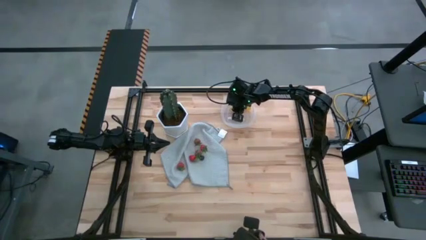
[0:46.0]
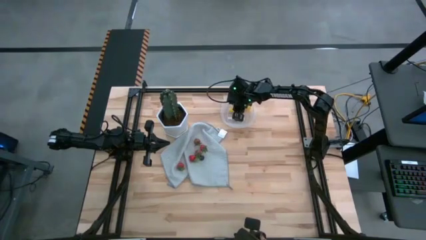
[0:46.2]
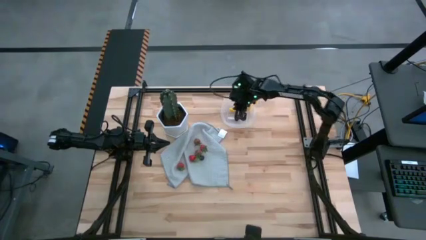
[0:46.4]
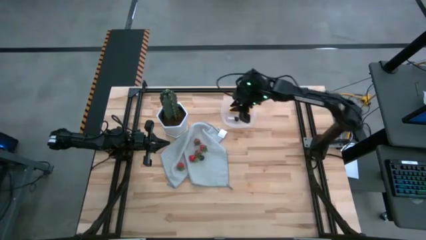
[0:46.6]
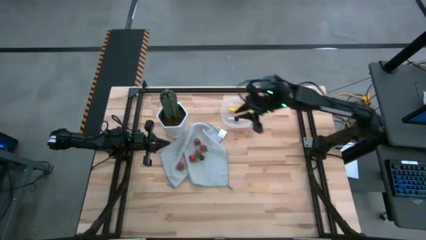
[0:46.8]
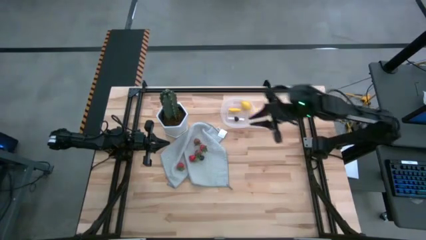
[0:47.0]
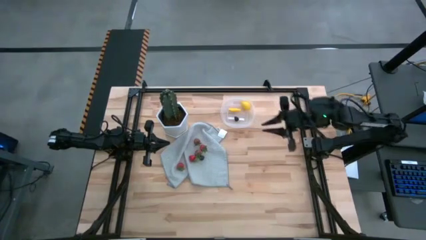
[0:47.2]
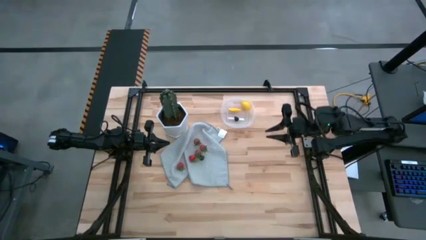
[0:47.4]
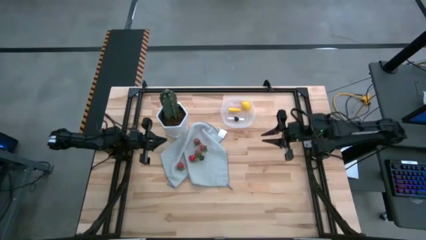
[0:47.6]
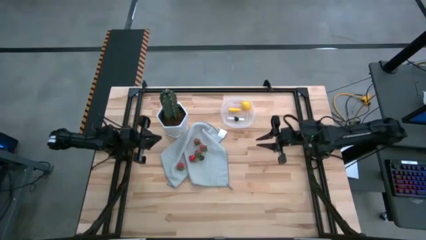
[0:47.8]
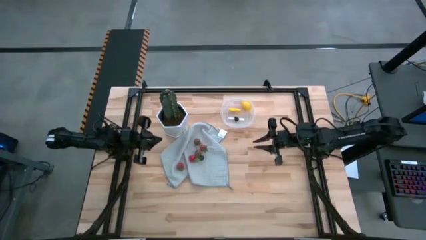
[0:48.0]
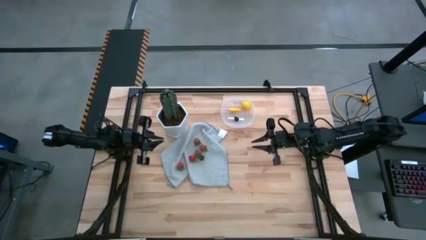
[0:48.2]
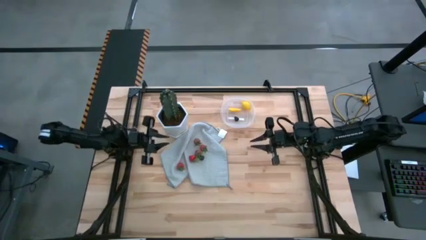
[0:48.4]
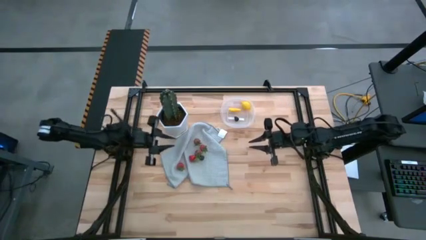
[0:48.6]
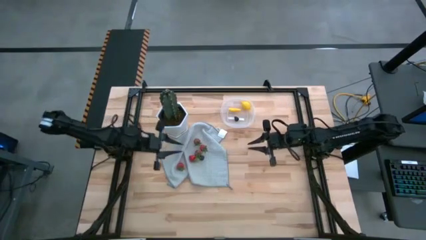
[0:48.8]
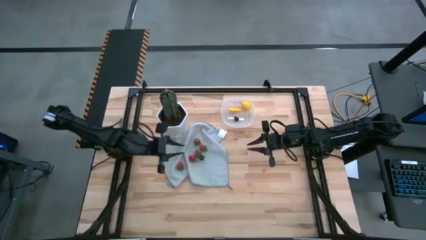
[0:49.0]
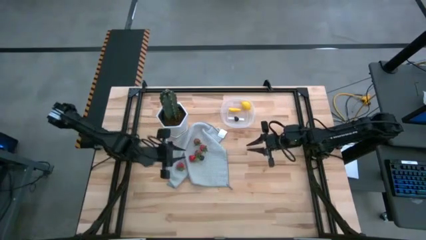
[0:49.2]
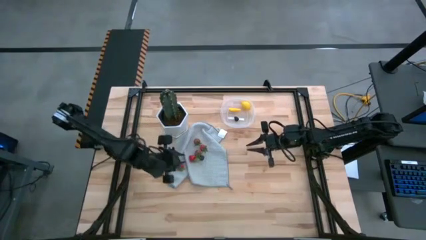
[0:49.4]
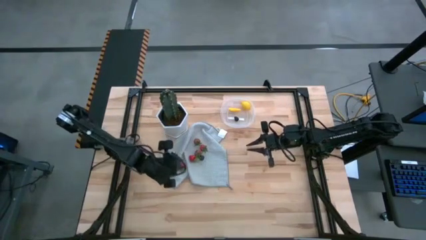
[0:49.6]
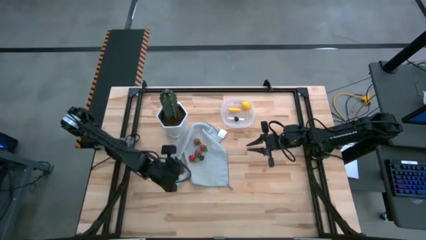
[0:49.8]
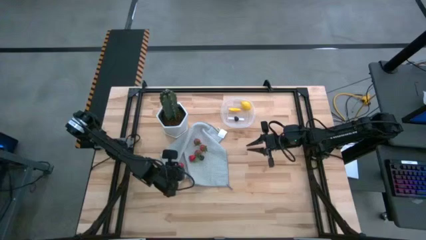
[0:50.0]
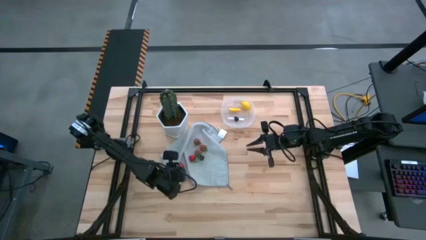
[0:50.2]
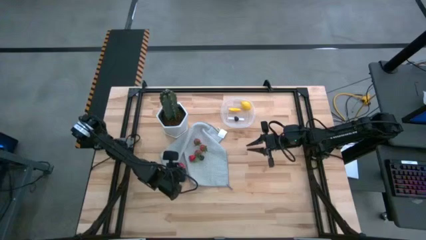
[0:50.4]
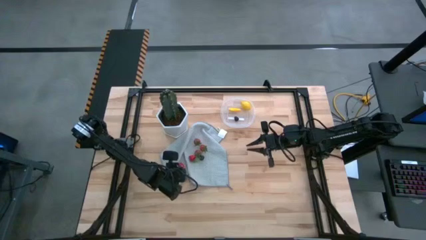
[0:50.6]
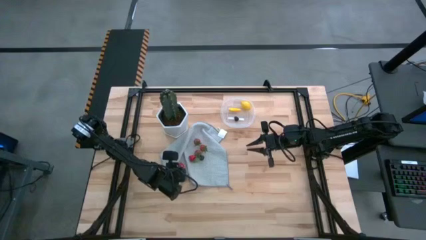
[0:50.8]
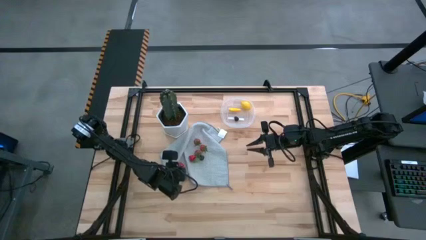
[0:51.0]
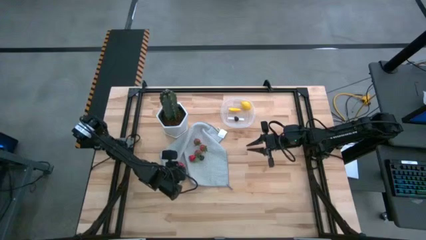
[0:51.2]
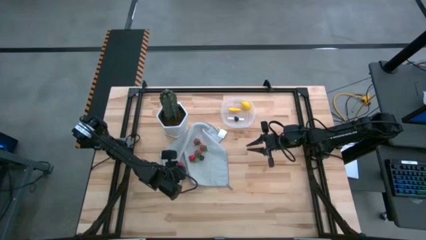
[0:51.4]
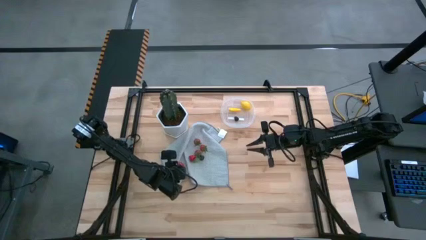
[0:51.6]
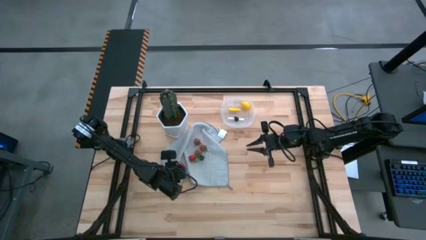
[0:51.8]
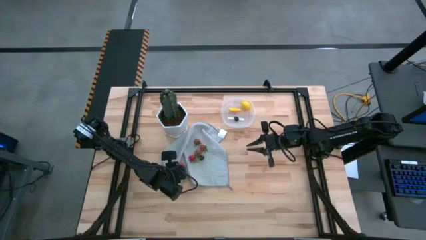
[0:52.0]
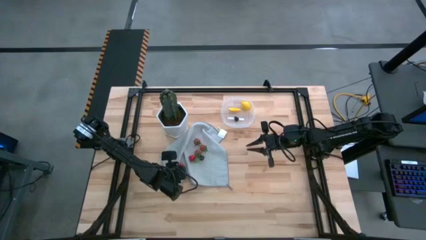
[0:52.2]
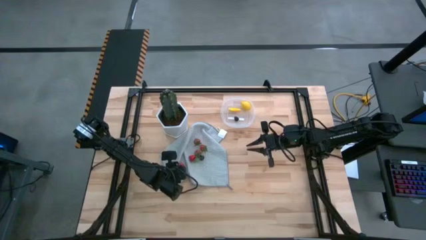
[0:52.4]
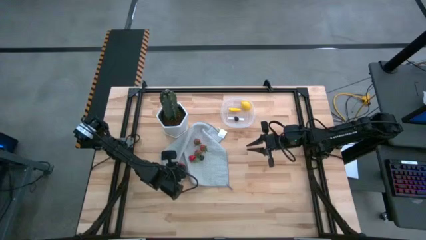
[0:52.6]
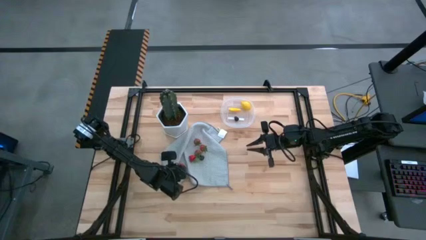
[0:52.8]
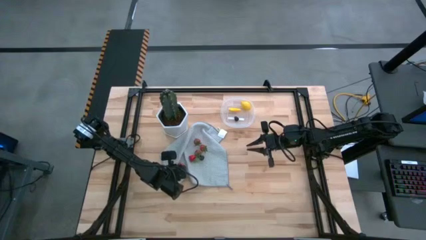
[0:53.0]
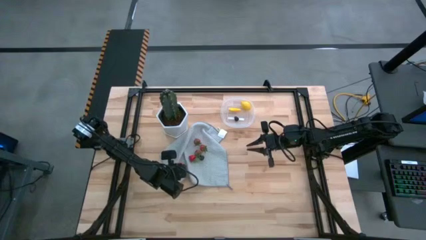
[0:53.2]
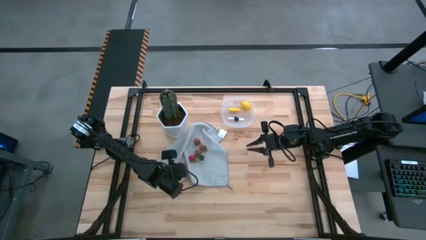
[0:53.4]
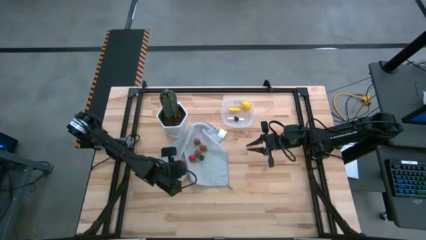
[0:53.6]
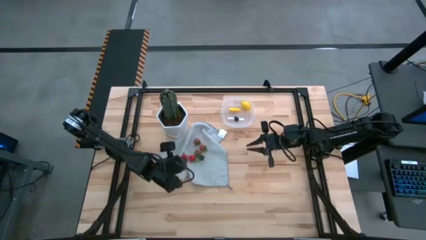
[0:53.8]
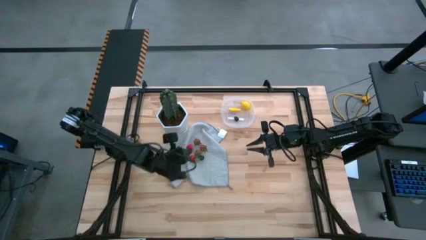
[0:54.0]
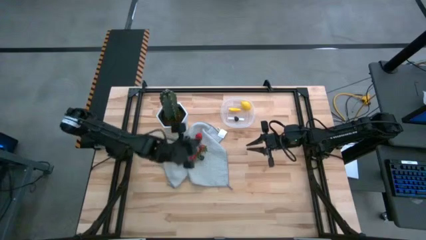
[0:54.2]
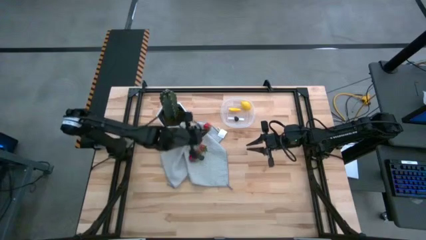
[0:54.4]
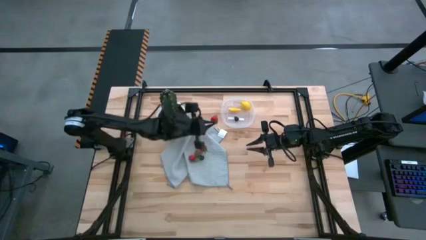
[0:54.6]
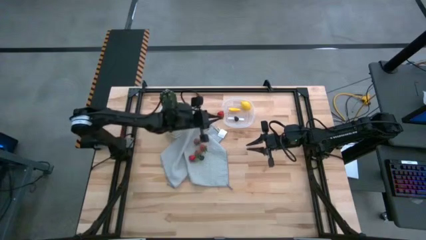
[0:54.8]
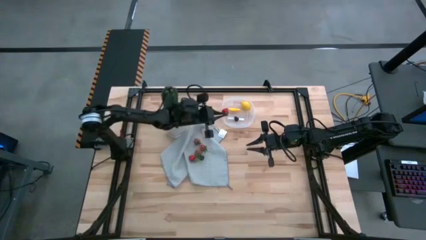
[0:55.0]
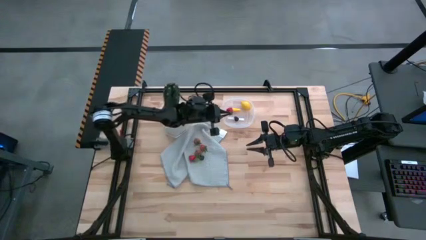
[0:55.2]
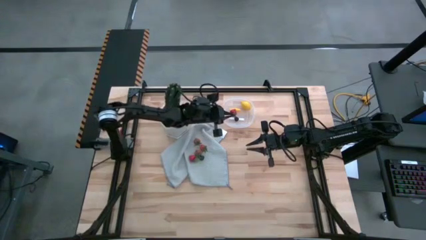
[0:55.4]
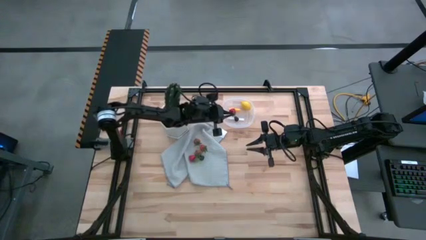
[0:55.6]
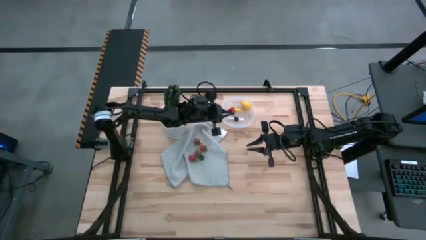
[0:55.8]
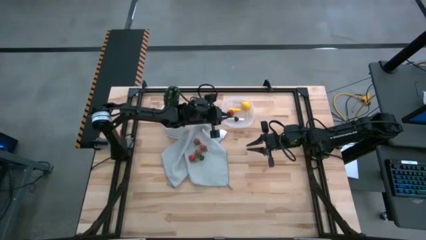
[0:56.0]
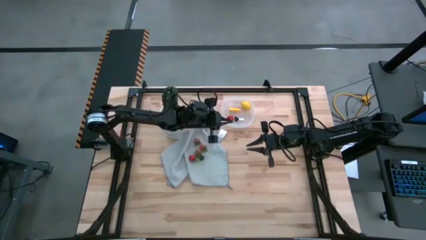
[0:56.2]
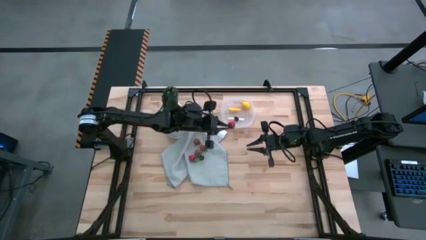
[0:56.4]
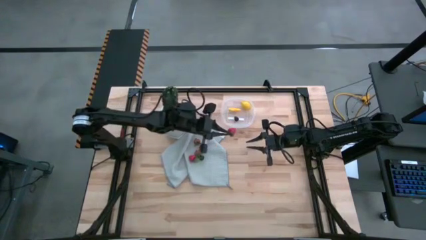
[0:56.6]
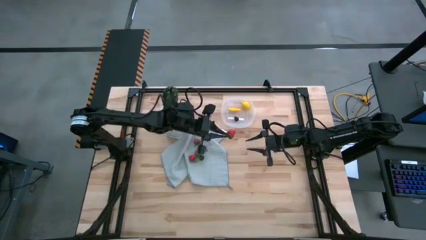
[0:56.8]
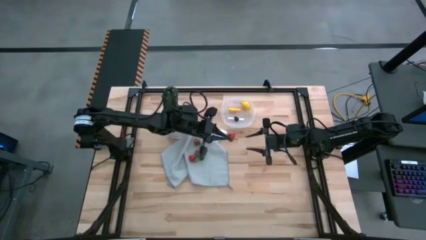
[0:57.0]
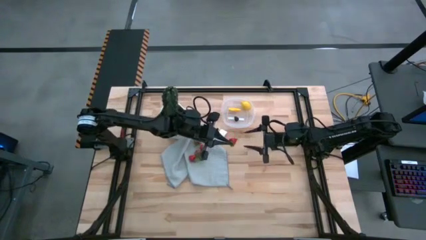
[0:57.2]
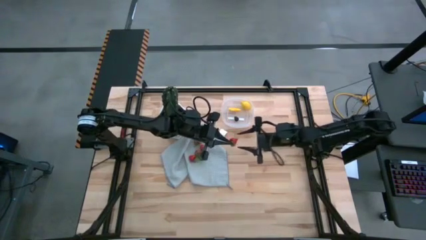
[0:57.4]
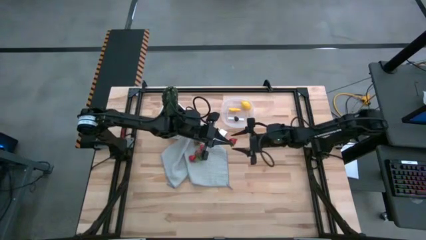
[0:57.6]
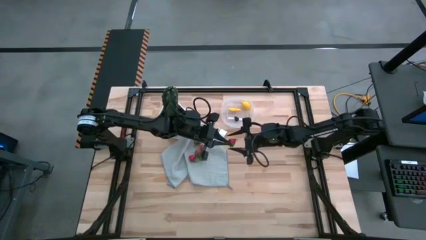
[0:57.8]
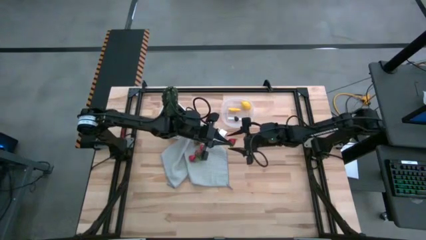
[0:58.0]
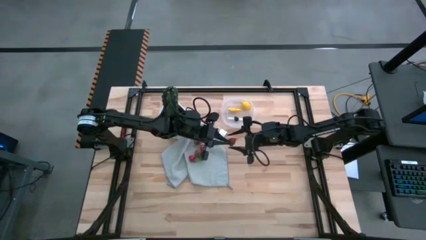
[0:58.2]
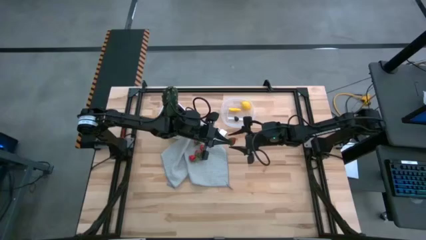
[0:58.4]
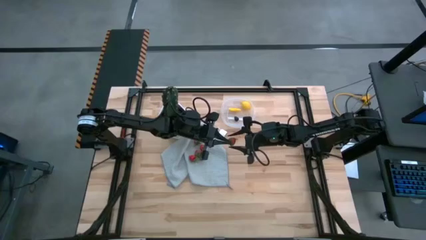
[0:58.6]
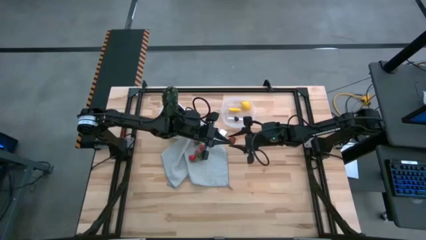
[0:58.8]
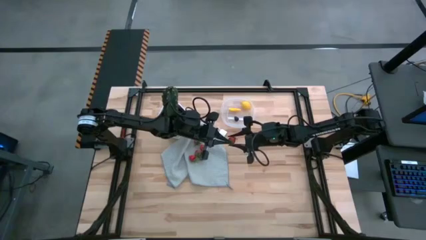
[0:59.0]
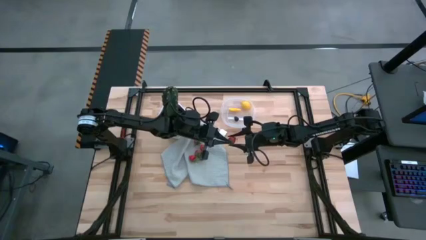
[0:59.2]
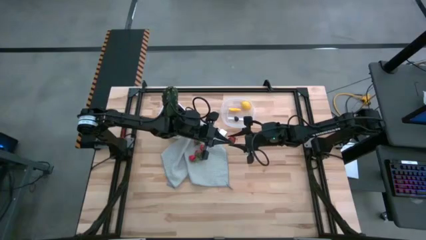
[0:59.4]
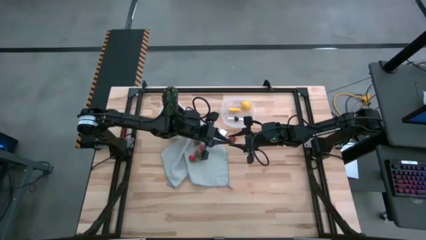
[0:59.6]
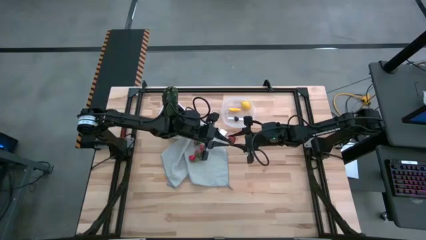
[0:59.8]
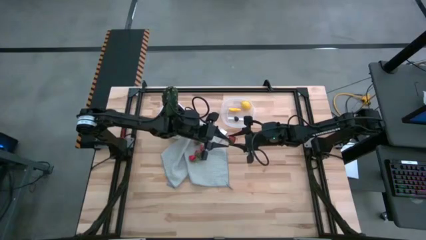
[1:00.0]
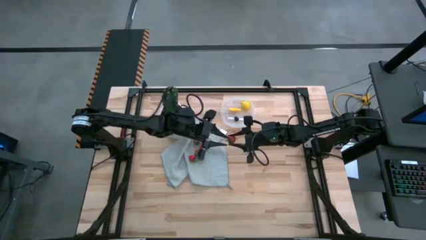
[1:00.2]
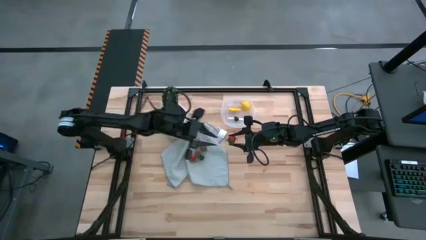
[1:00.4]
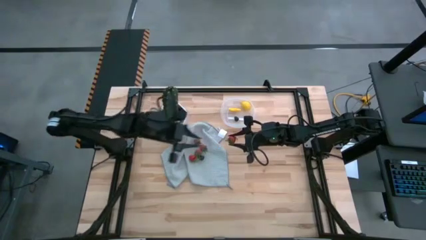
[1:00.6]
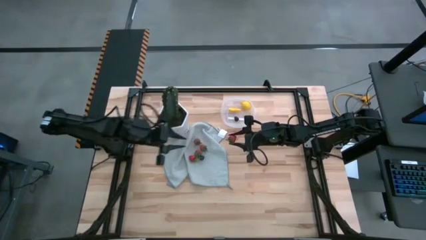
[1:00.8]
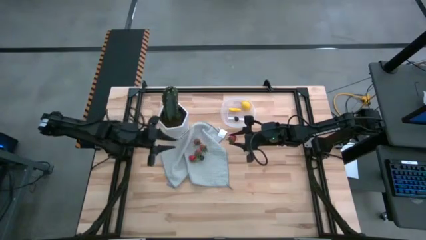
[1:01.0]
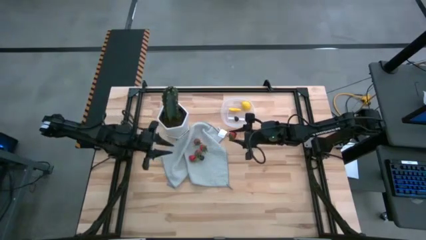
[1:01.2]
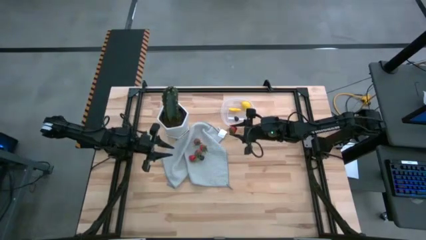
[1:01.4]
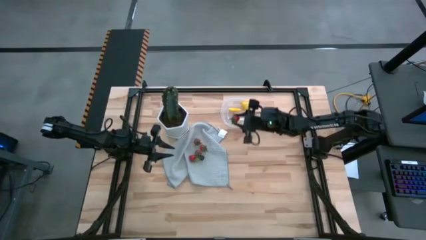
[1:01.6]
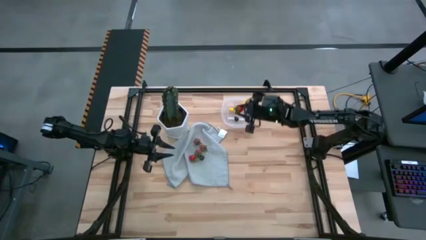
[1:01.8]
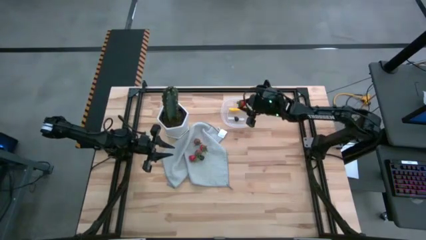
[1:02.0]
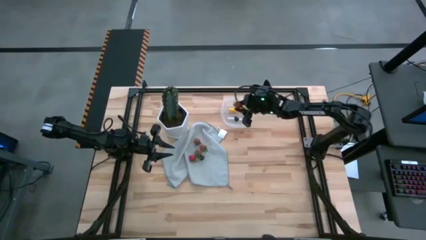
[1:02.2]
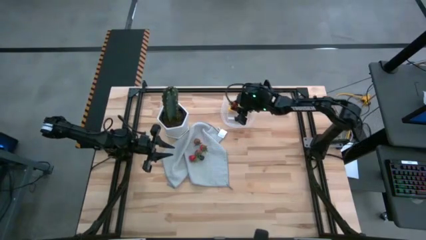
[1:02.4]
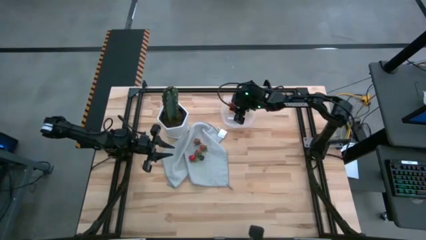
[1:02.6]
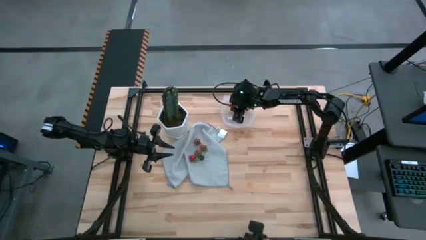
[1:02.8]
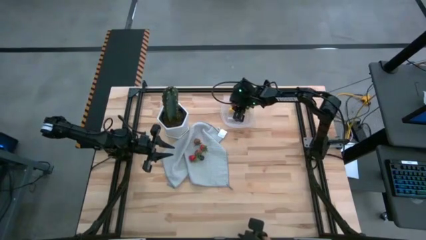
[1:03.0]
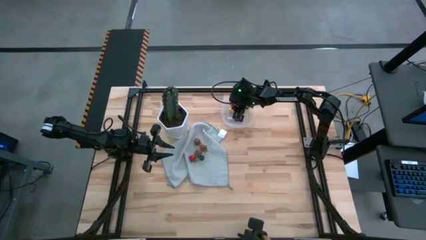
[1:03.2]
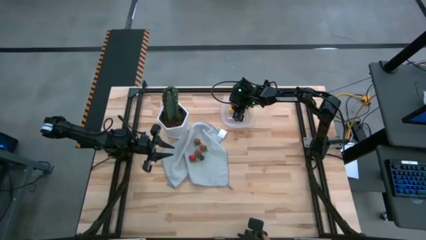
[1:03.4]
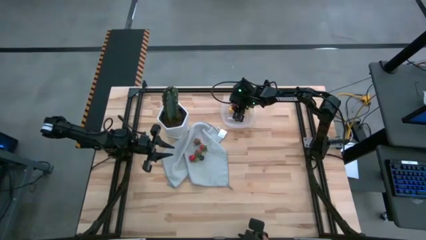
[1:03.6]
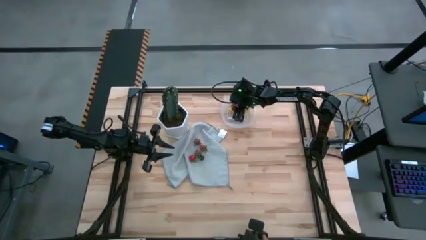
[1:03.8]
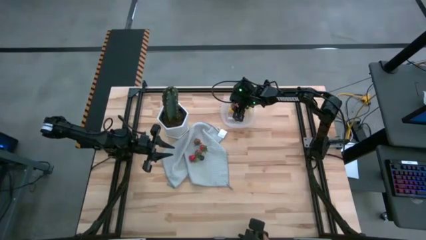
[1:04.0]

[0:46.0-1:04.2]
Task: Pick and placing Produce into tupperware
Put the red strawberry into the transparent bin
